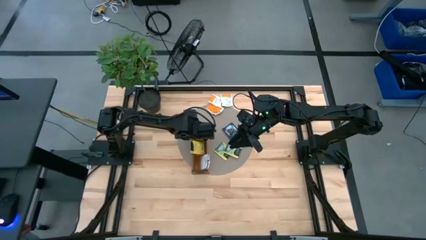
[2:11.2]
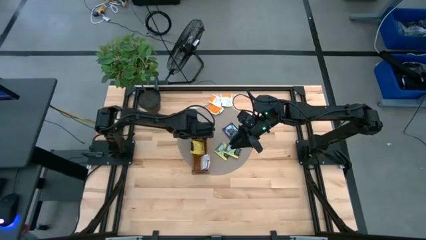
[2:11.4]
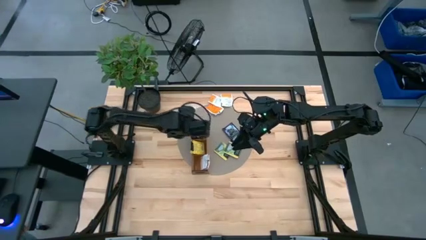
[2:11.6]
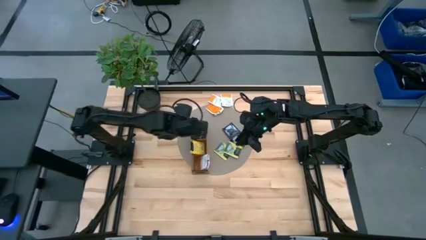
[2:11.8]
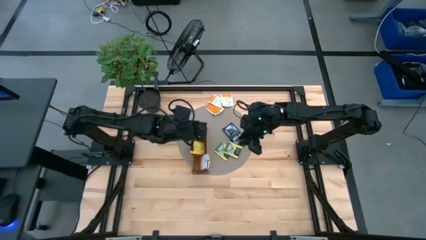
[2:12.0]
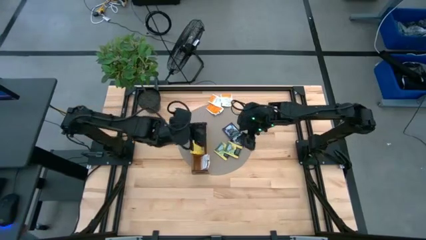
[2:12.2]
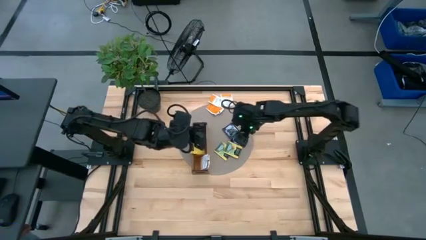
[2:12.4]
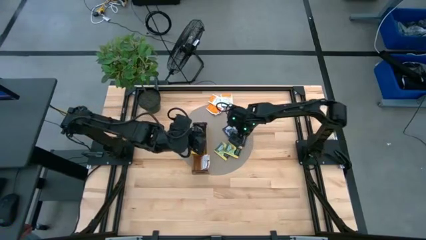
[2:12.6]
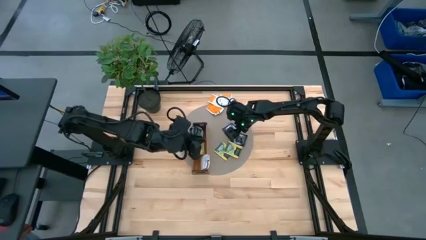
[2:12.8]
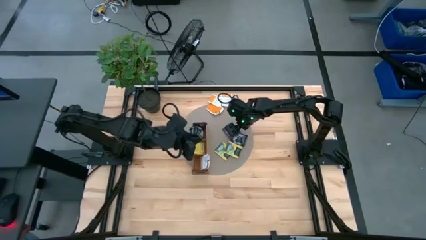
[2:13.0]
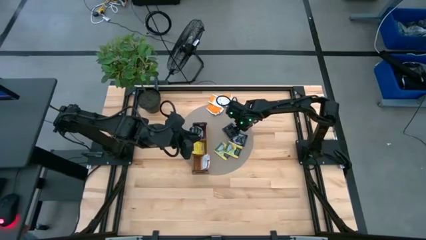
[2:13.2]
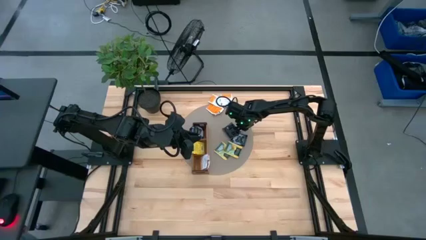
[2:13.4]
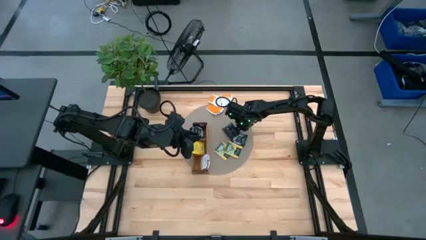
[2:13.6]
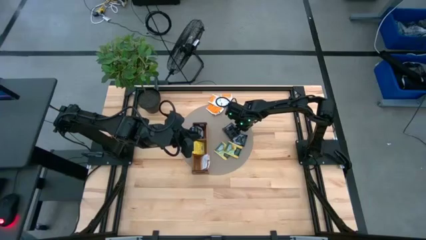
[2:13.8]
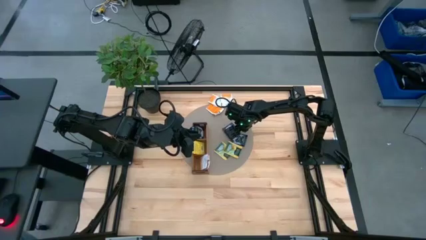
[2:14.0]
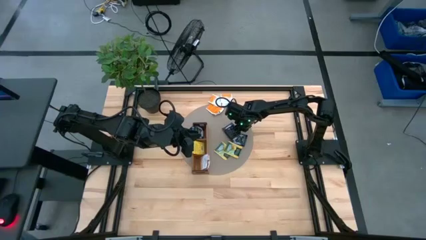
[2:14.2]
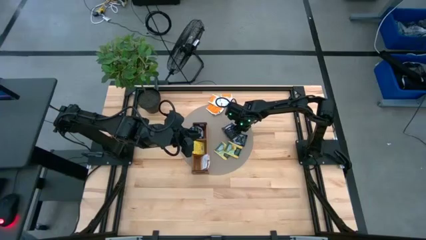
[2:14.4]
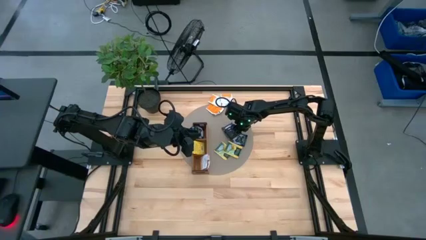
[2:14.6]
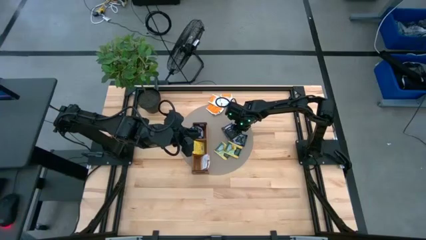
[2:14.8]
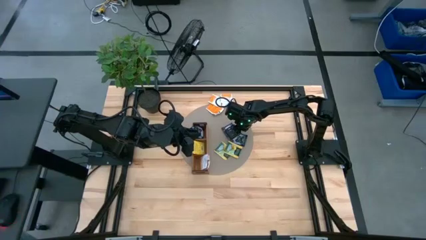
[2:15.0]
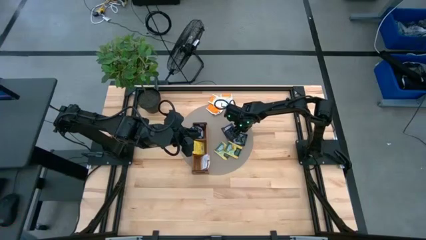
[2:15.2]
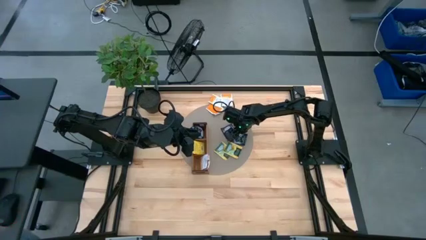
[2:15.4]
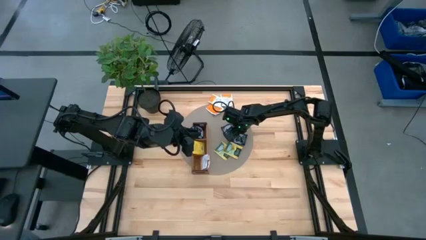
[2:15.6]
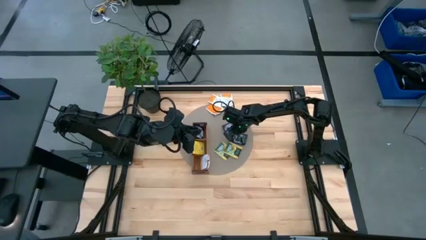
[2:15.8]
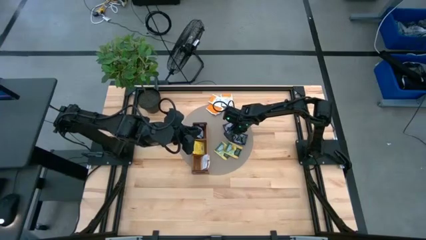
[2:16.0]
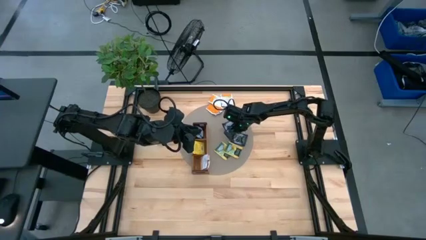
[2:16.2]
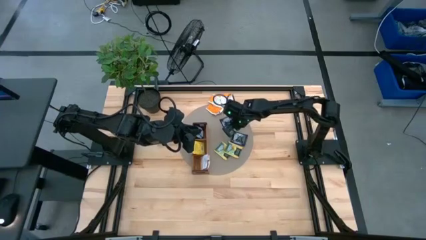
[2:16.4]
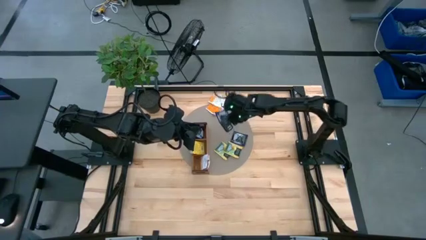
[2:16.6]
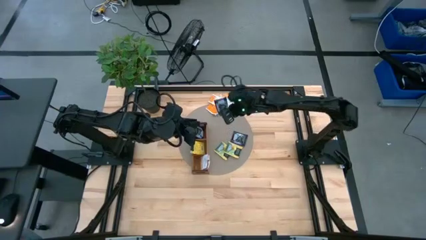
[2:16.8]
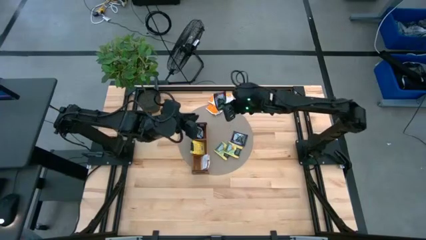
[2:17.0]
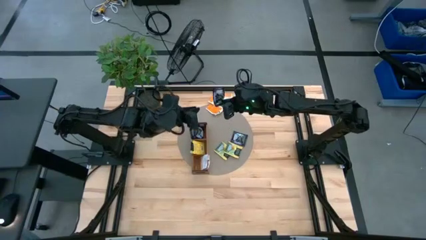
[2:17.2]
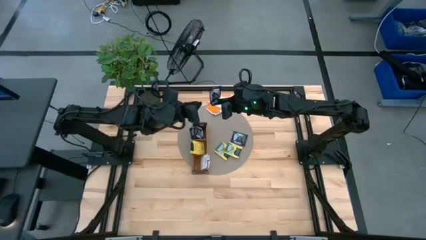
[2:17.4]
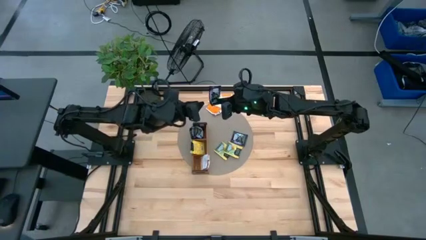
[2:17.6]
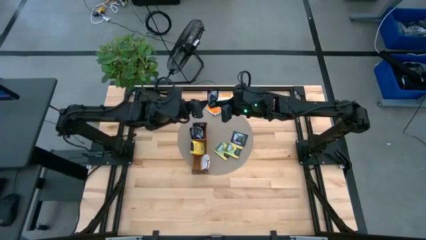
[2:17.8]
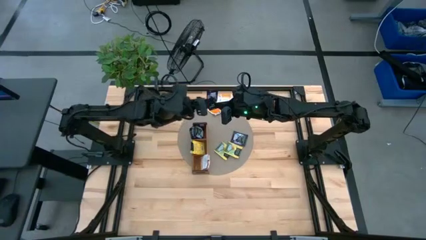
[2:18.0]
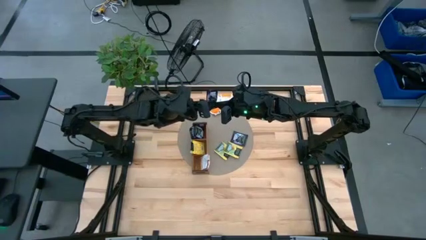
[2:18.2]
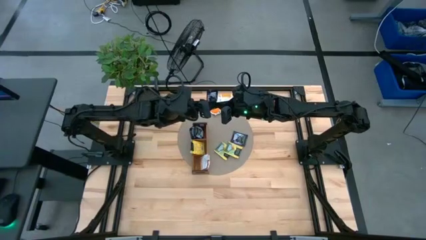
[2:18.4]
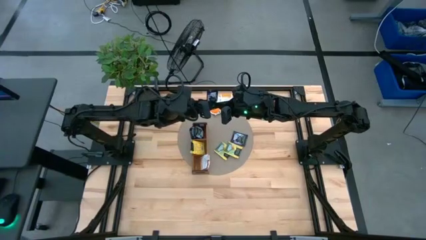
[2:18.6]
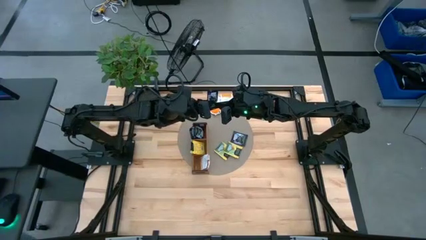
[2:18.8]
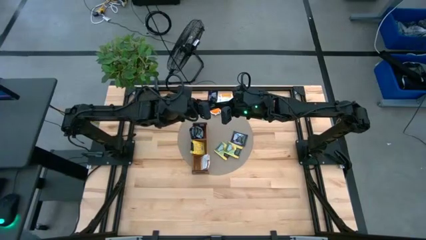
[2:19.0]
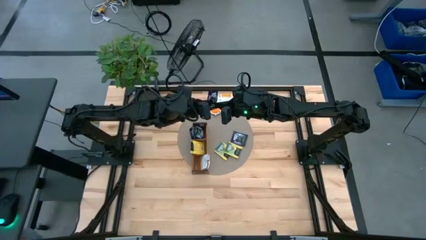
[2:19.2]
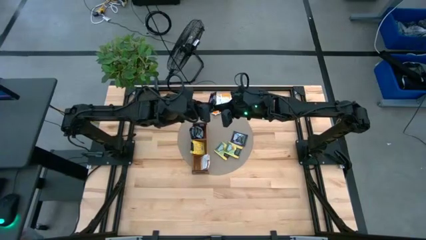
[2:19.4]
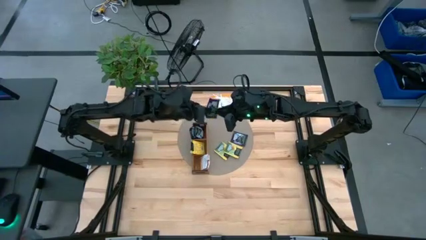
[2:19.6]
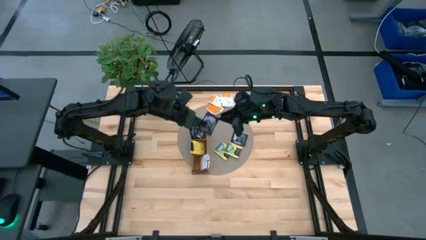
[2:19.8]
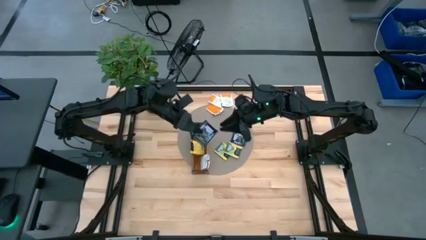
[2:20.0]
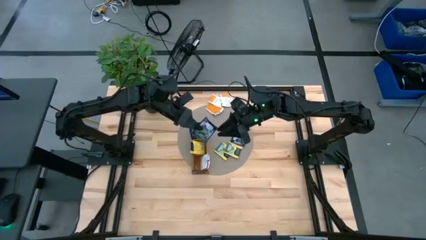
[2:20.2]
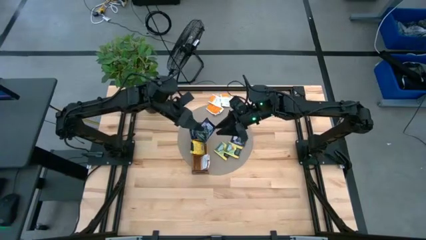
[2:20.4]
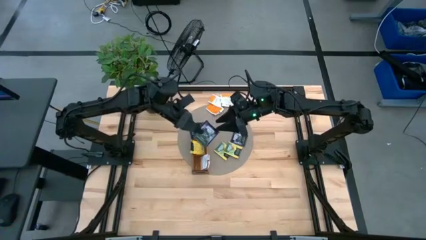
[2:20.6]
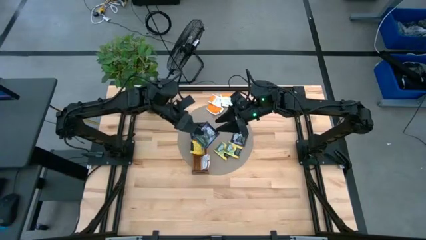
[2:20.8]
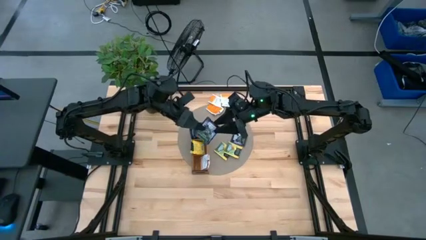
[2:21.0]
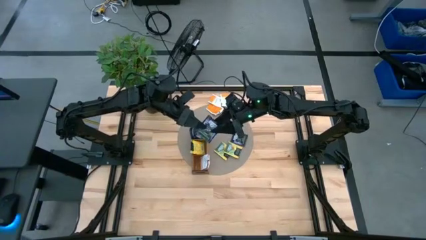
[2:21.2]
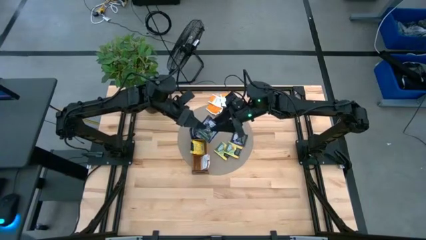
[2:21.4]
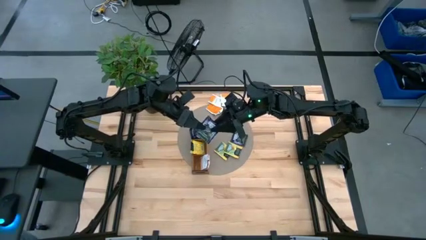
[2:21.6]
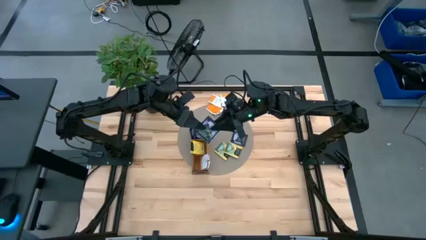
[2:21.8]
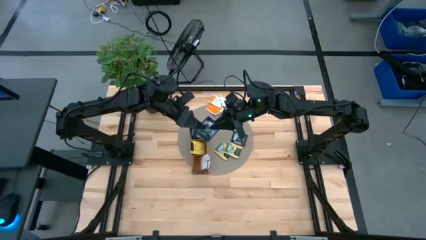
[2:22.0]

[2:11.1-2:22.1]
Task: Pick & Place Tea
Put the violet tea bag into the top section of the wooden organizer
